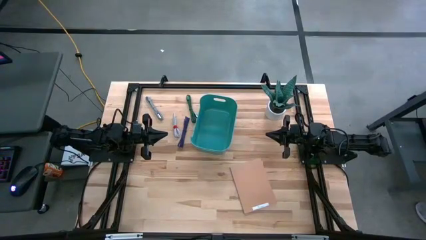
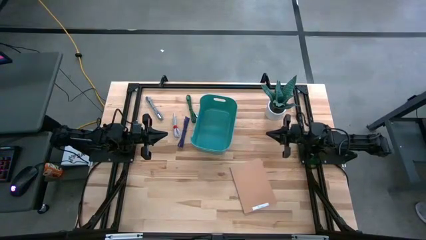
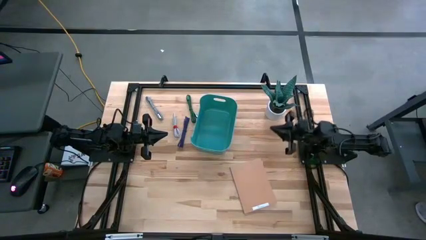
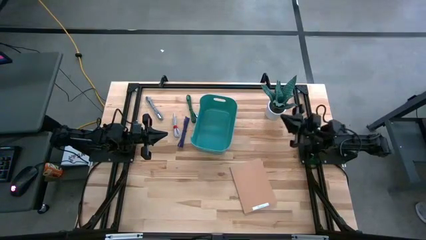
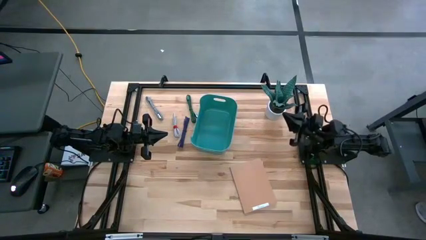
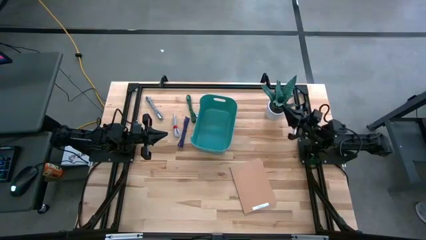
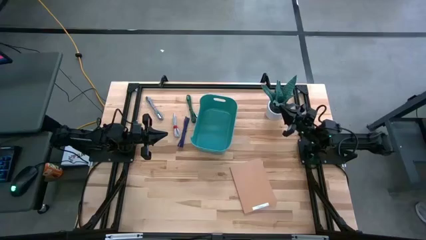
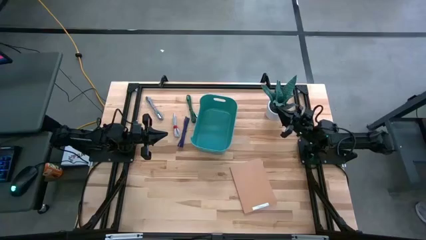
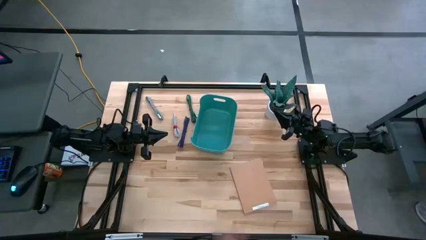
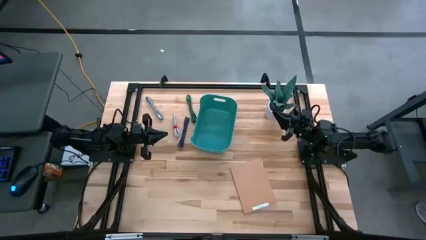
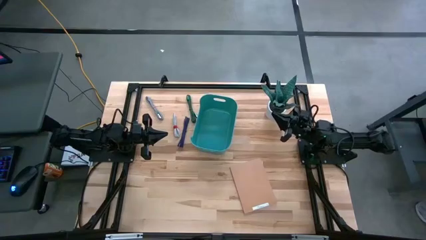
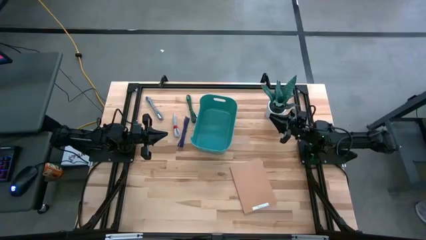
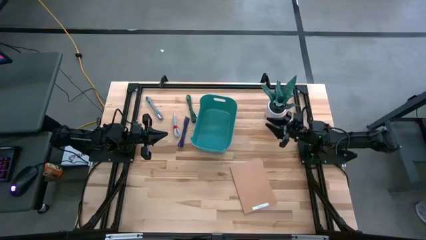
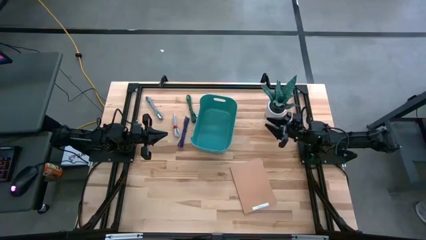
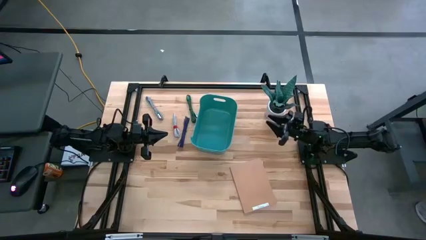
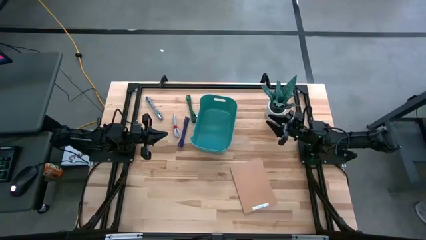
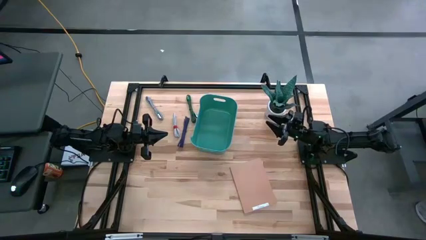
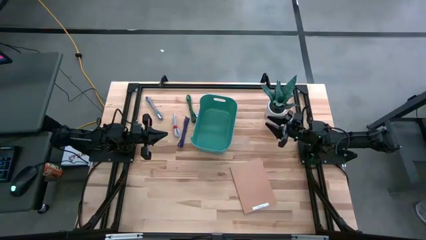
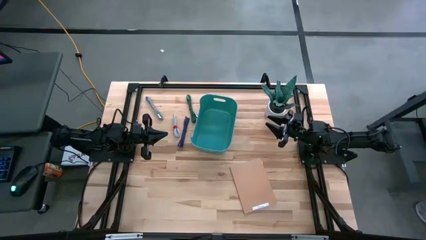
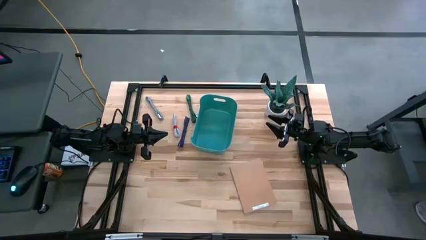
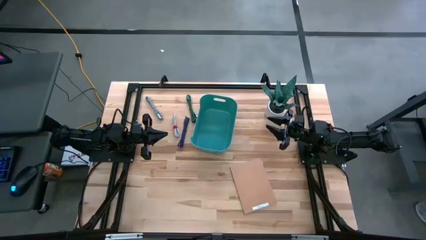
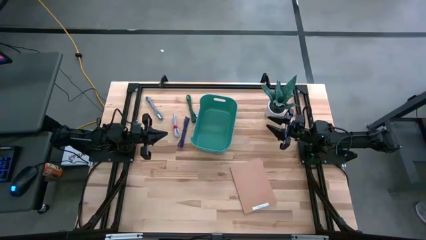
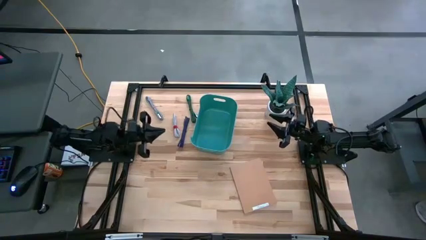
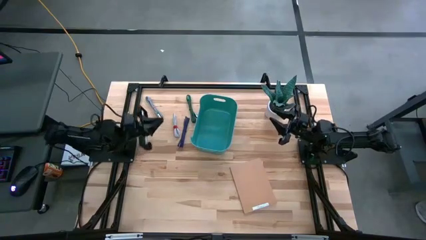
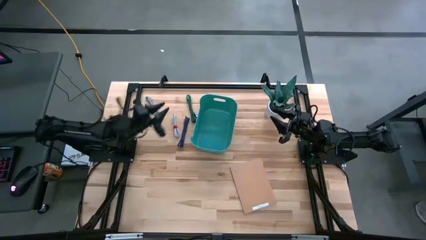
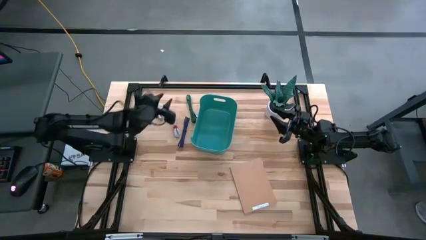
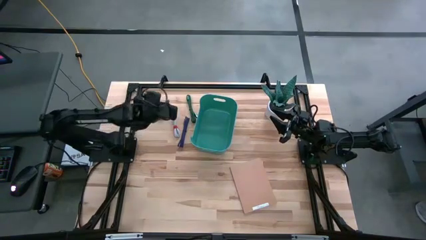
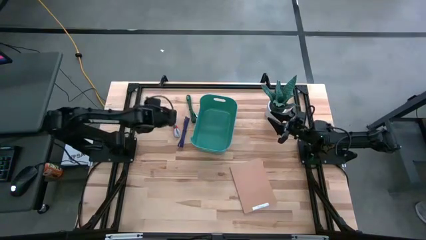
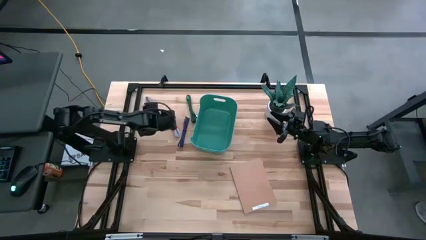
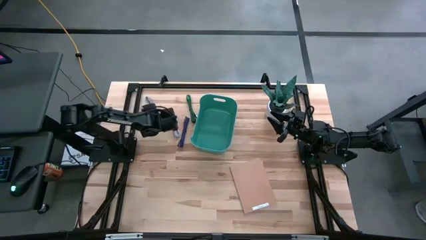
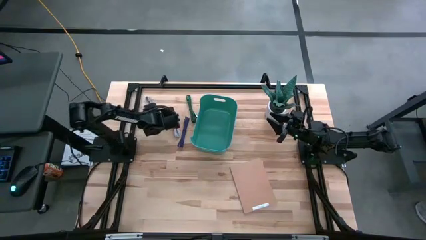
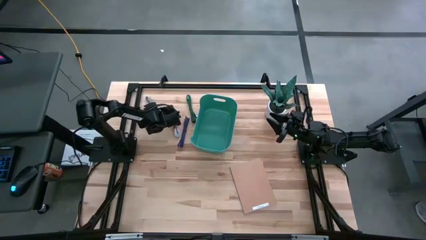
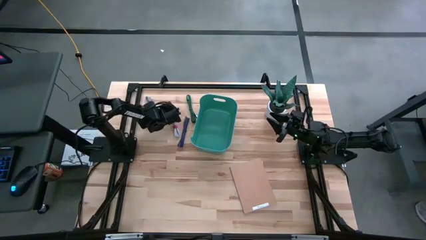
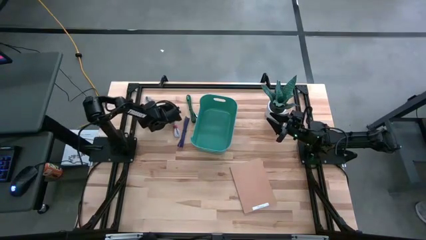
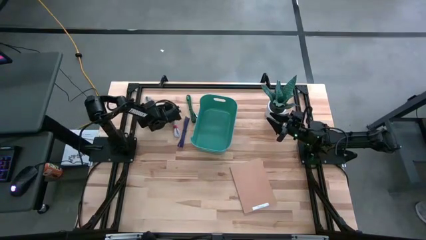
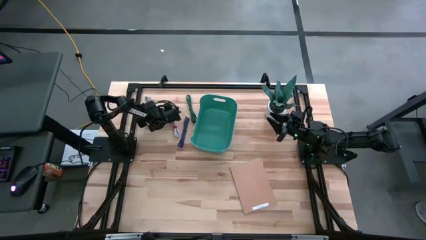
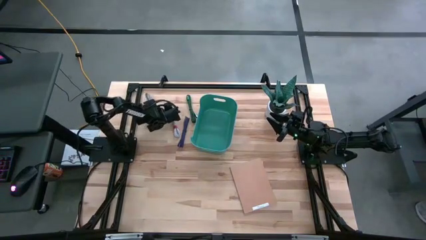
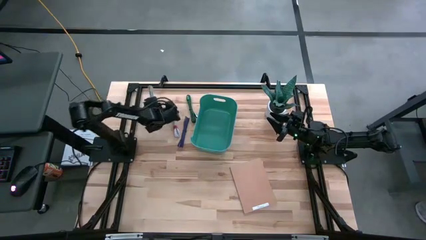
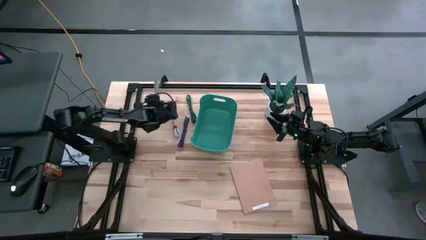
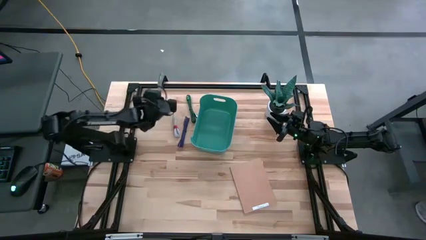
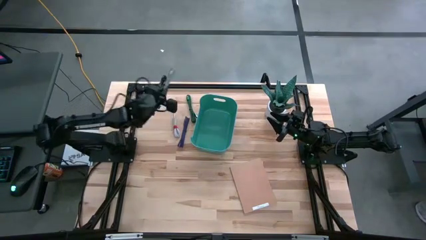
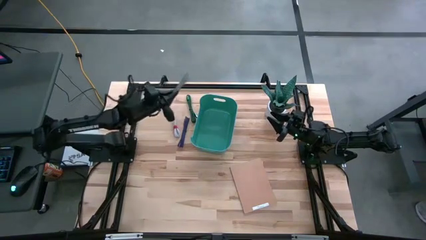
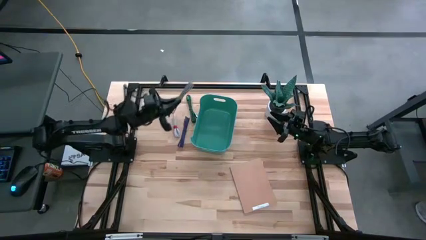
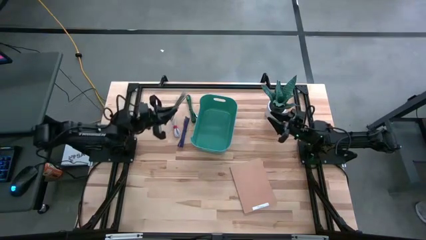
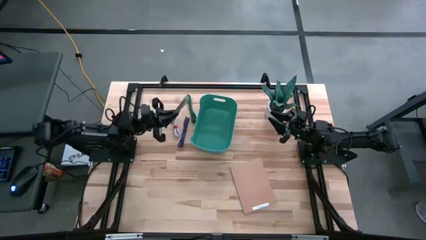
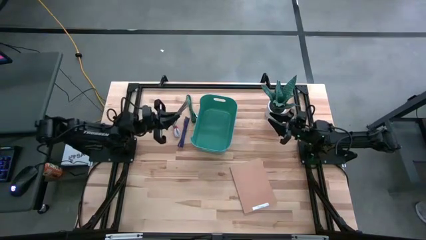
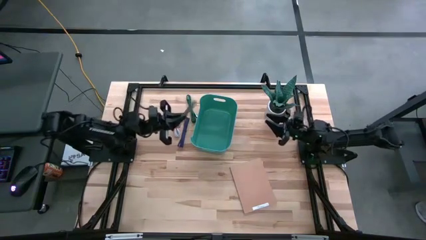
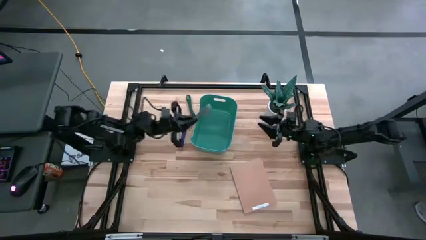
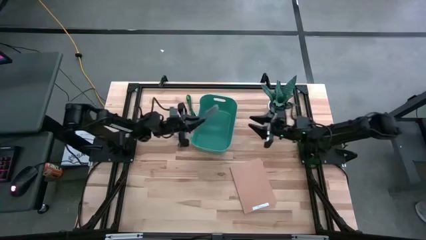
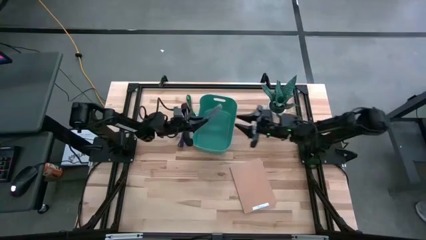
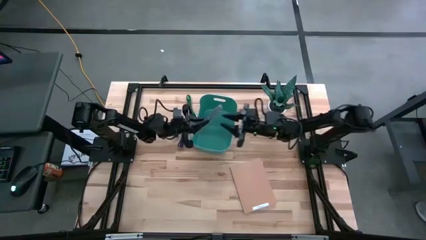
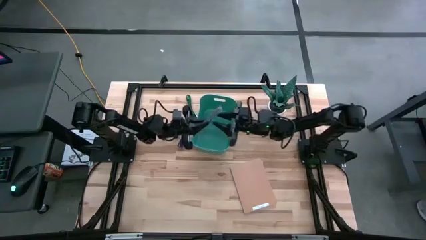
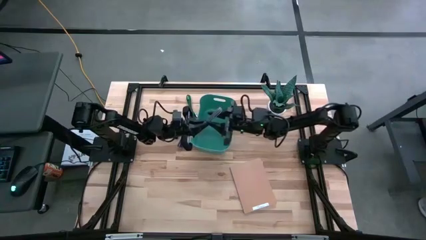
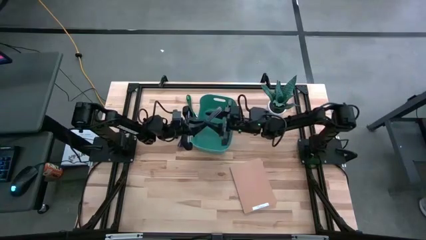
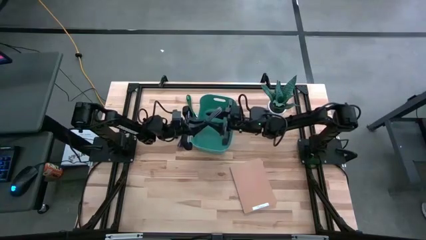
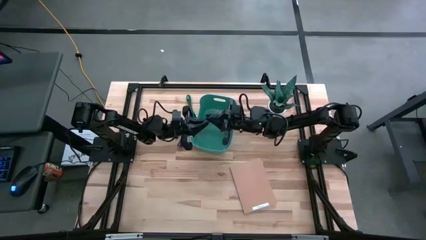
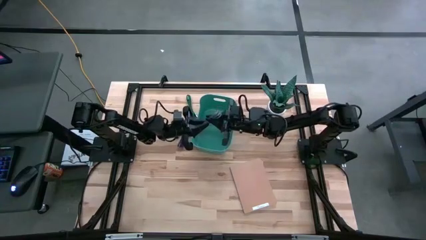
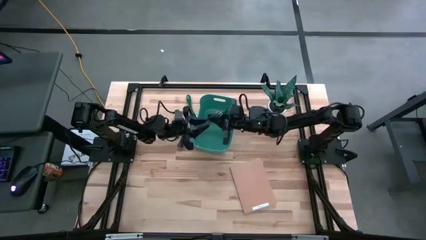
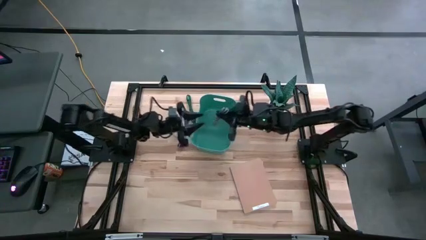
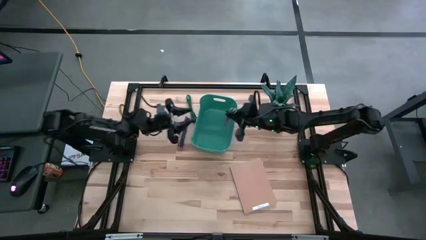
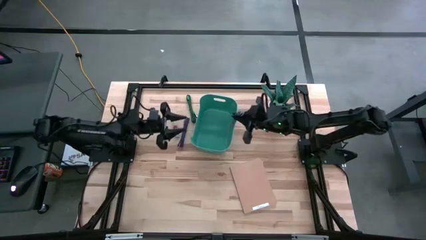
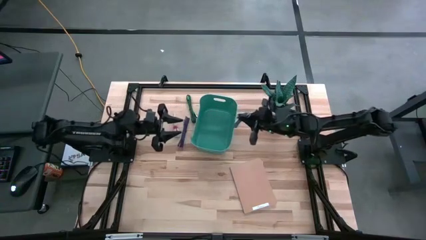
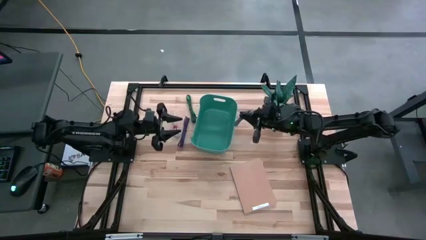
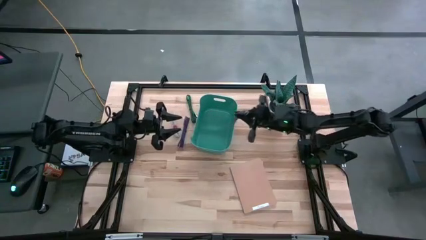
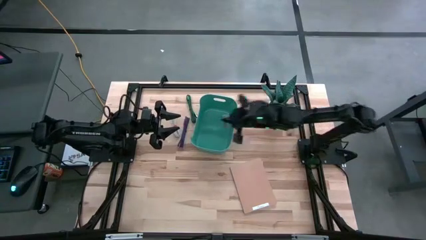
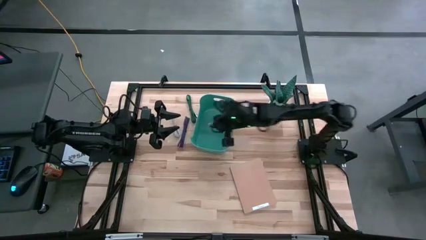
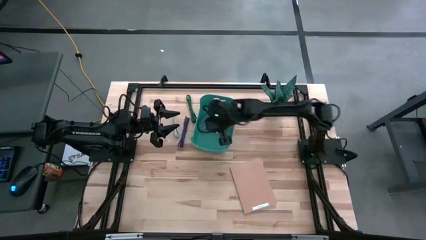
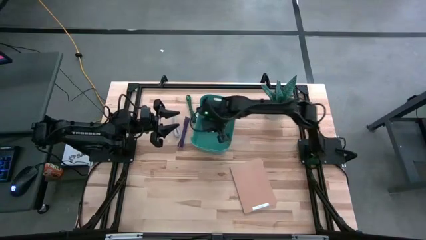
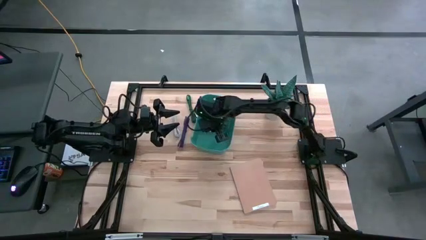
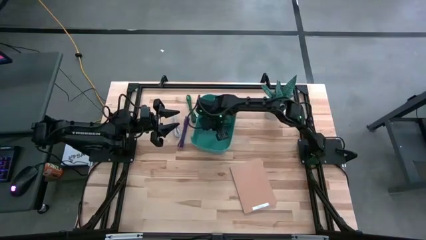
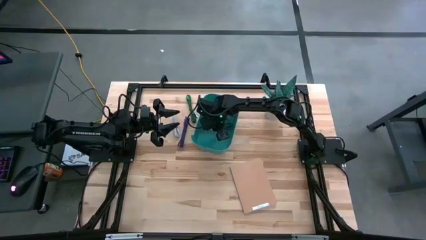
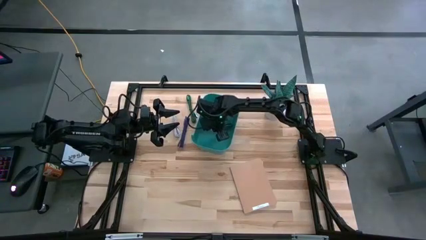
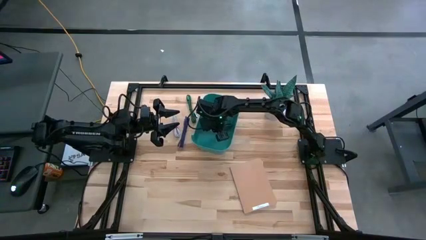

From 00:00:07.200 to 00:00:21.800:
Task: Pick and place USB-C Cables
Put the black and white charger cable into the green bin
